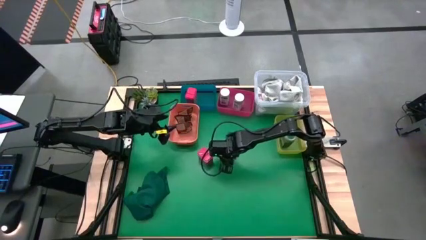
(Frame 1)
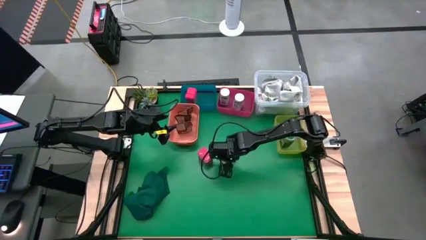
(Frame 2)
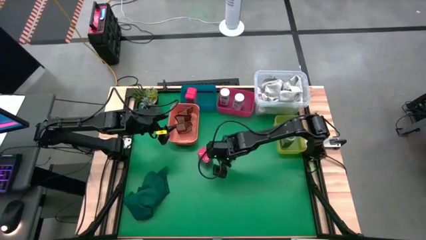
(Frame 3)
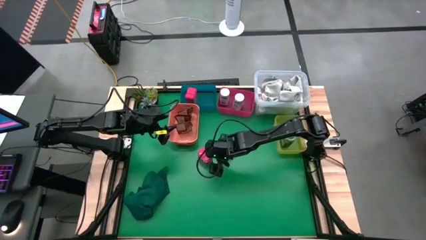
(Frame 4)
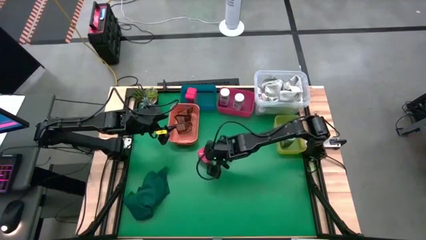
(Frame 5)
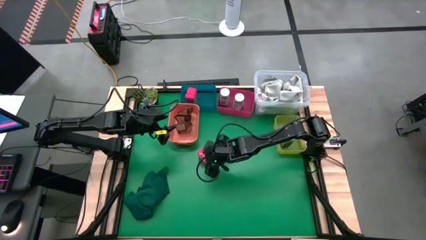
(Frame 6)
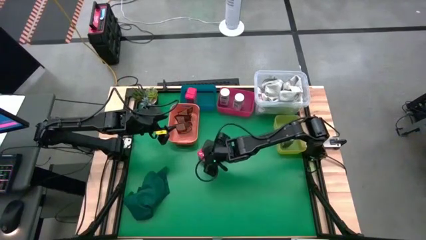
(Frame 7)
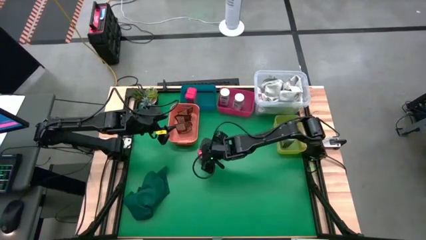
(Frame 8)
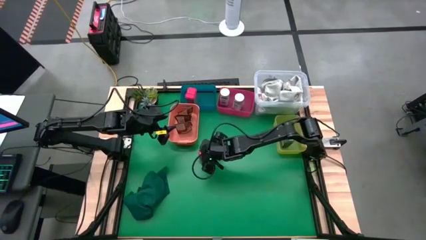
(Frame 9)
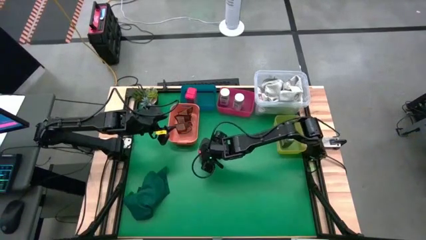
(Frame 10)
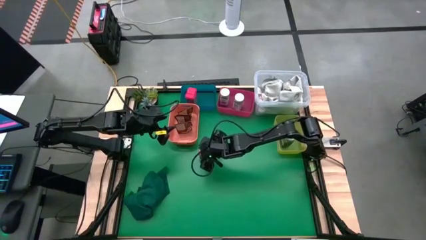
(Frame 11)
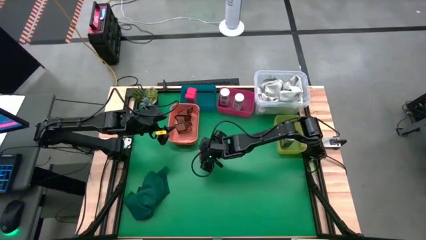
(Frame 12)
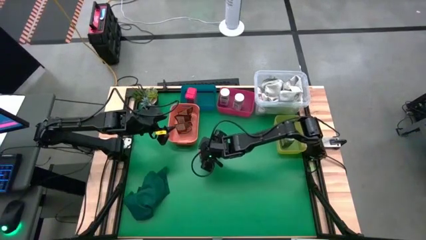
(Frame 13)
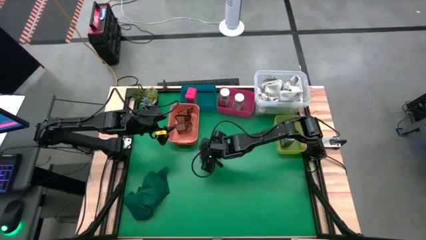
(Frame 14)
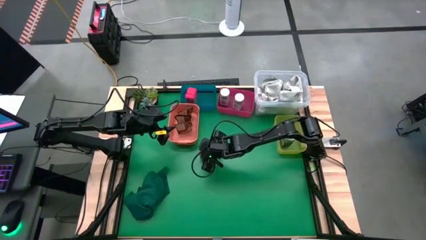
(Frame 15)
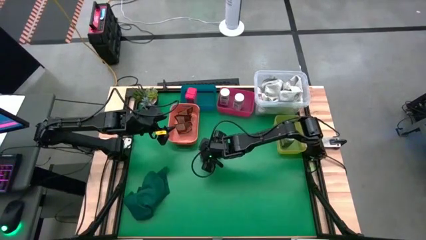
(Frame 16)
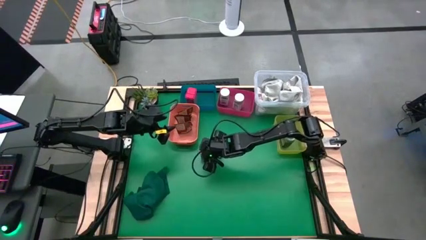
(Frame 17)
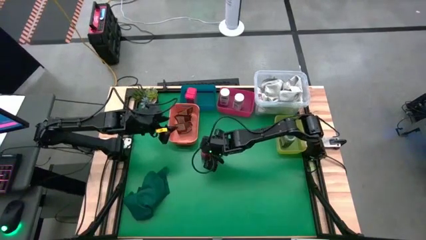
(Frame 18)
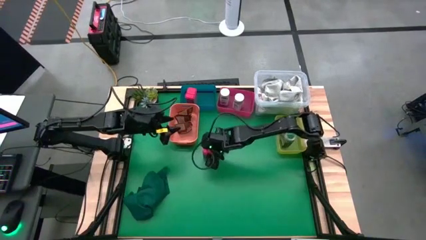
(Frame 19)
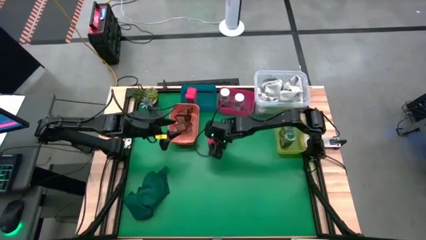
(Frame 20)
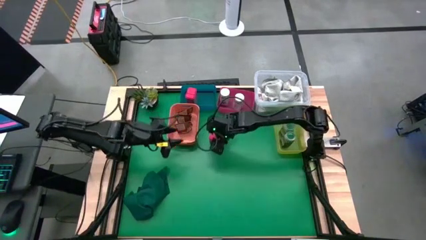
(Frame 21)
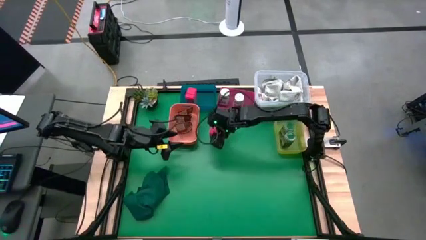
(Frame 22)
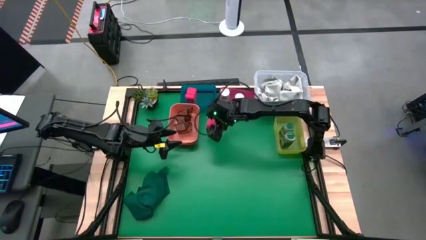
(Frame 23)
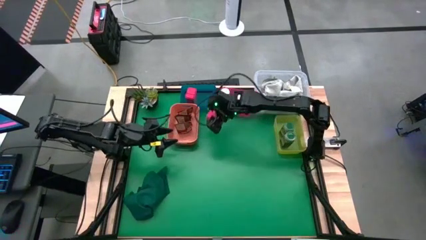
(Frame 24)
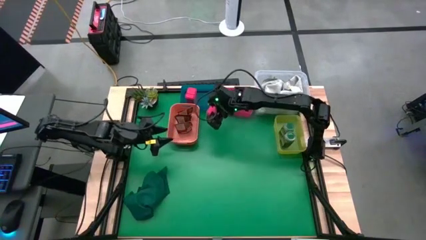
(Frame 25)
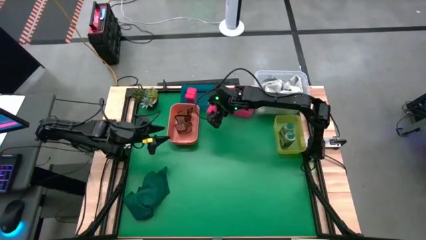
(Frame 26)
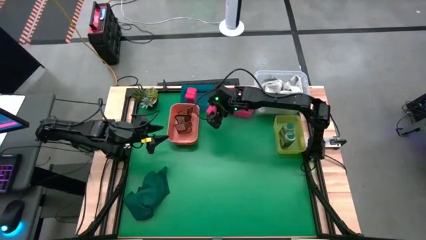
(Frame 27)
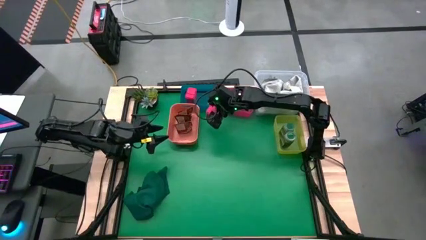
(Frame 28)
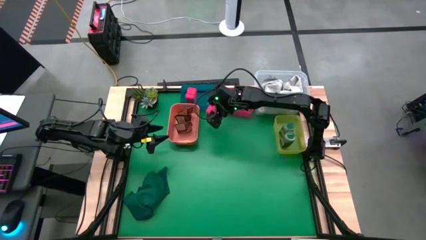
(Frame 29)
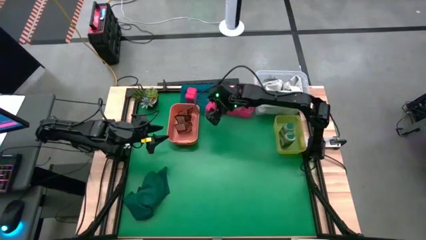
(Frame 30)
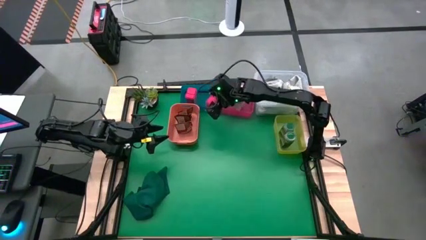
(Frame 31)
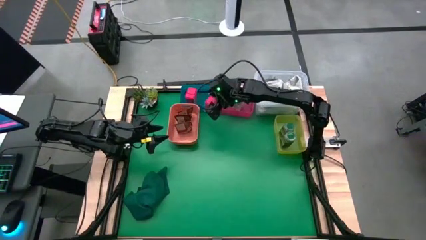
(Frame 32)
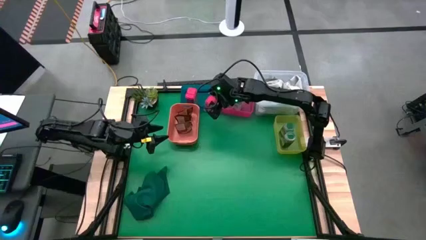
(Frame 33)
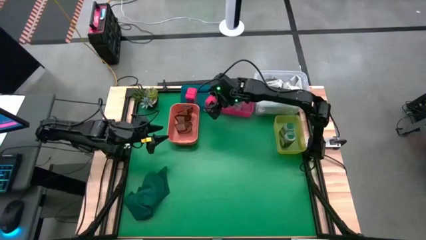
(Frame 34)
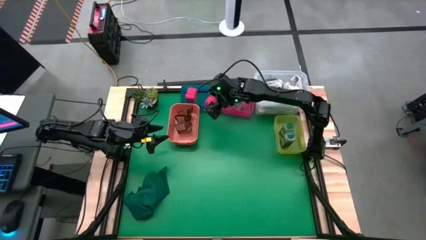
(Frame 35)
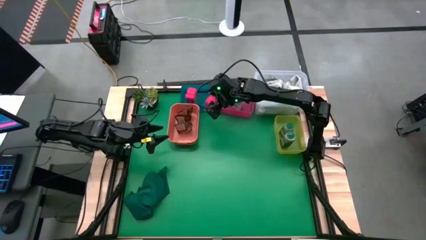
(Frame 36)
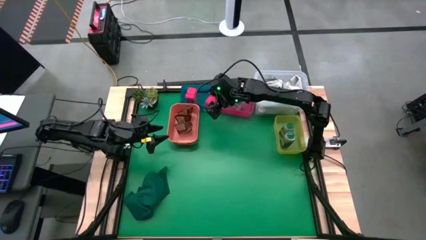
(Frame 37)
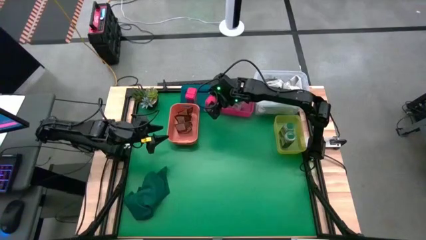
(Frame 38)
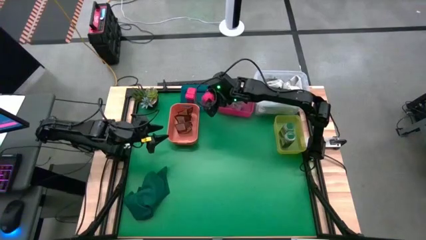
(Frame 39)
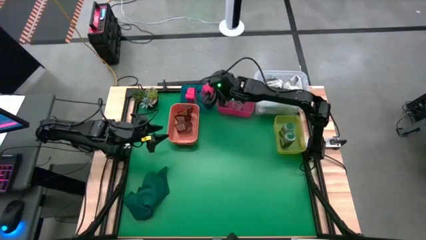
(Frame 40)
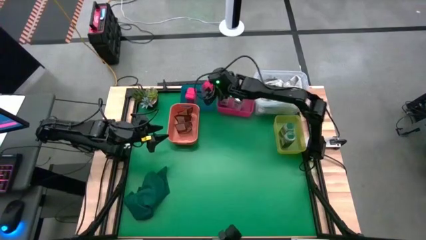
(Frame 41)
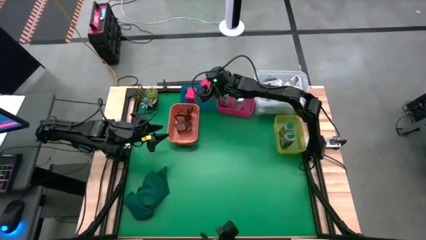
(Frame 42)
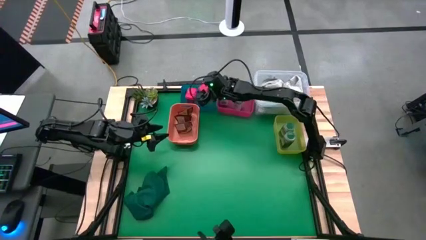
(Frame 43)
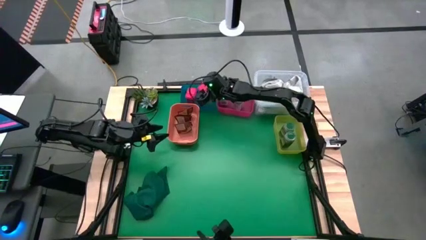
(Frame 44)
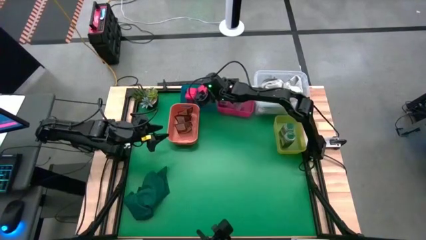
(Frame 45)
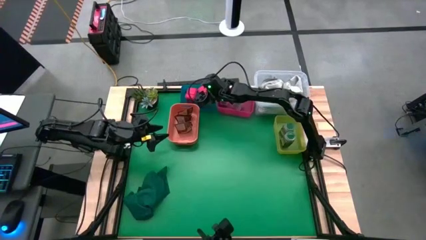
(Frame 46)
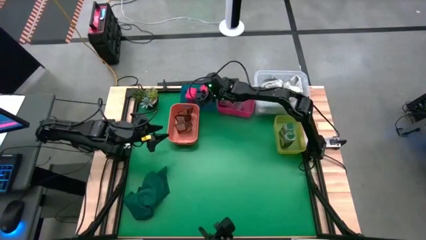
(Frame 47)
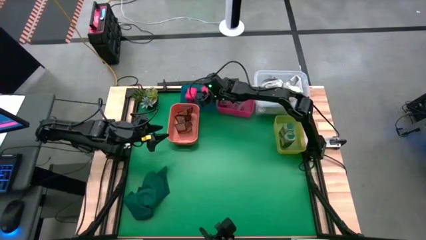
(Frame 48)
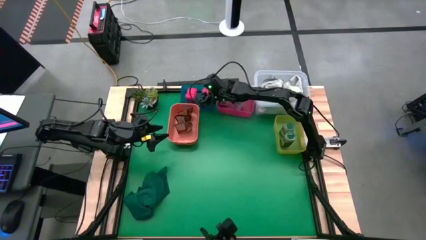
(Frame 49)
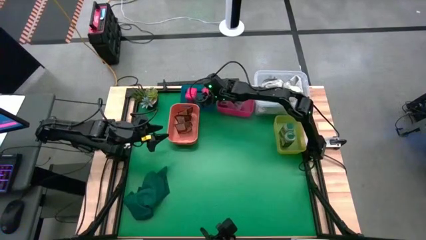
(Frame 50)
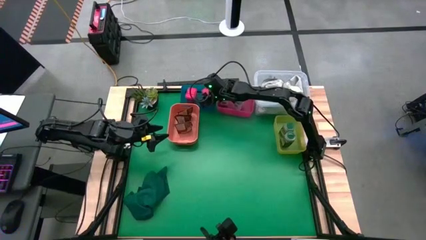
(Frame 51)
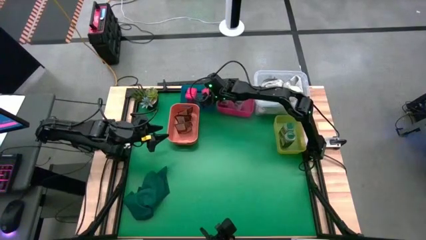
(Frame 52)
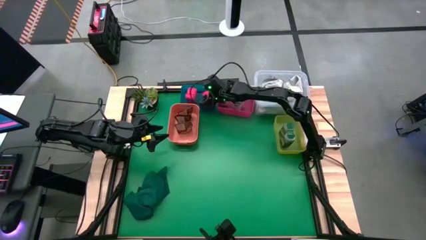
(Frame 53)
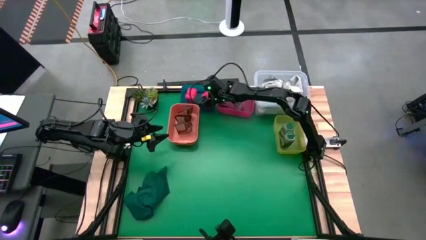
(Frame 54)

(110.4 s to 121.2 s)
Task: Sort spices by type
Put the red spice can into the blue bin

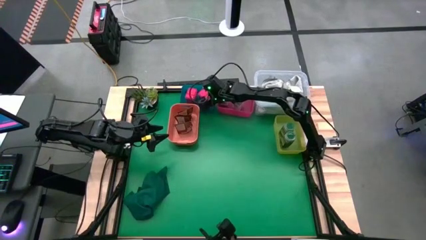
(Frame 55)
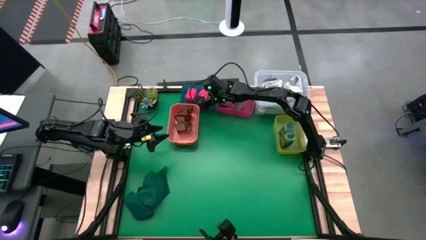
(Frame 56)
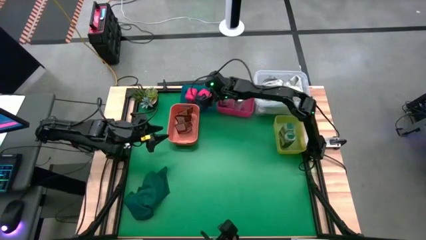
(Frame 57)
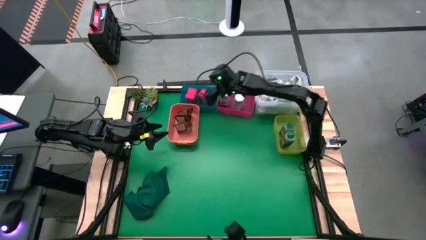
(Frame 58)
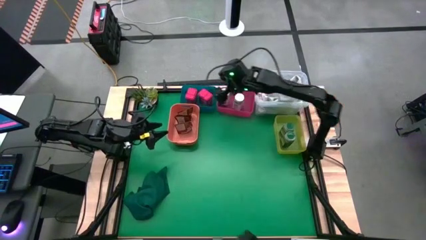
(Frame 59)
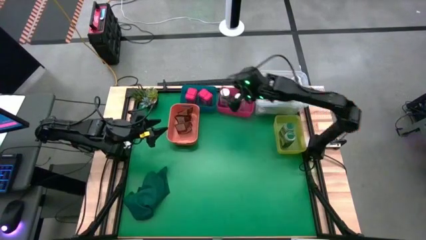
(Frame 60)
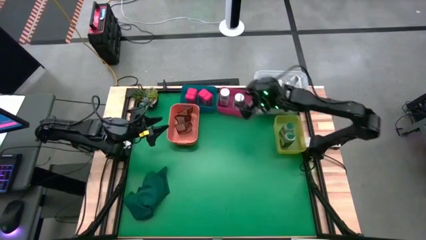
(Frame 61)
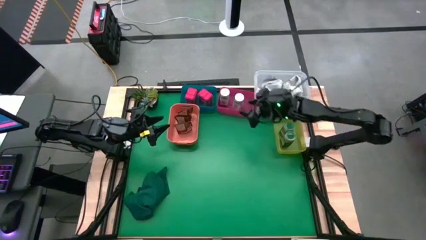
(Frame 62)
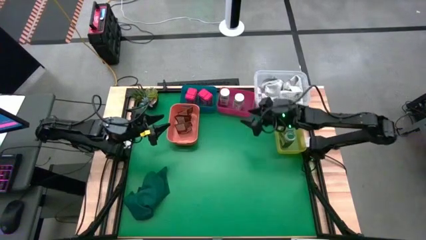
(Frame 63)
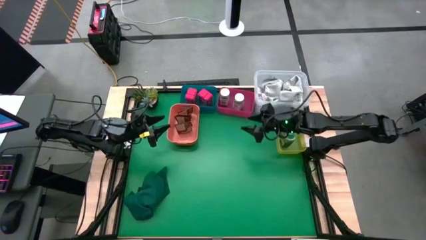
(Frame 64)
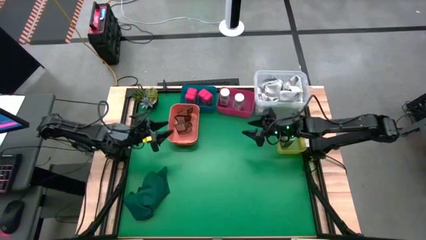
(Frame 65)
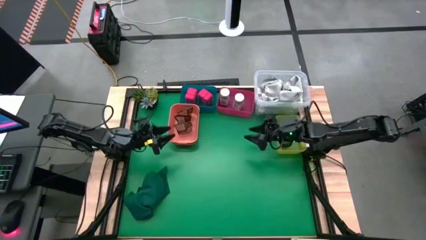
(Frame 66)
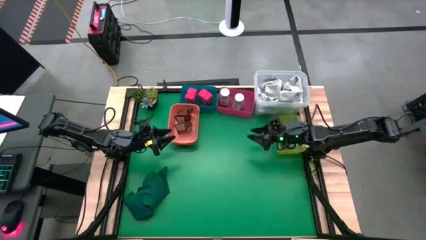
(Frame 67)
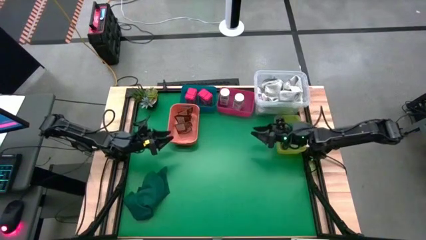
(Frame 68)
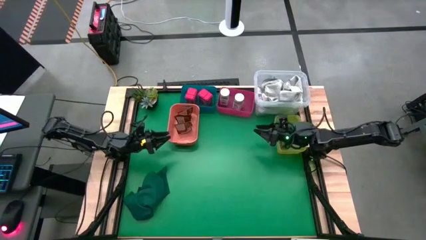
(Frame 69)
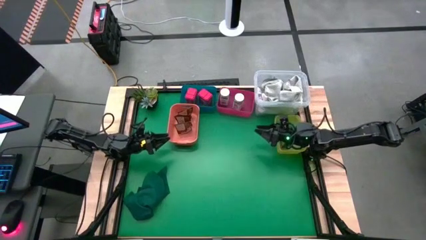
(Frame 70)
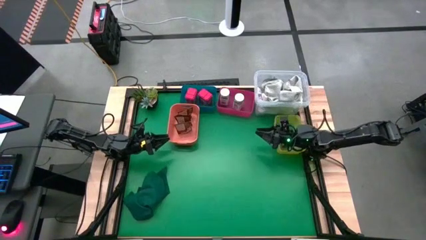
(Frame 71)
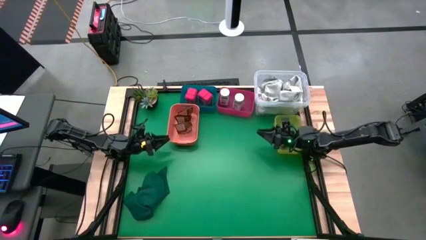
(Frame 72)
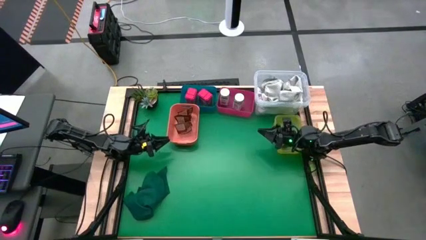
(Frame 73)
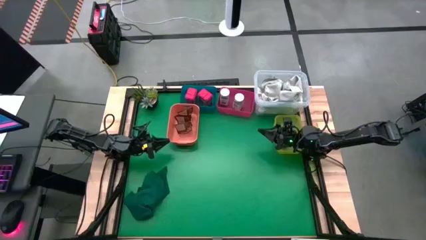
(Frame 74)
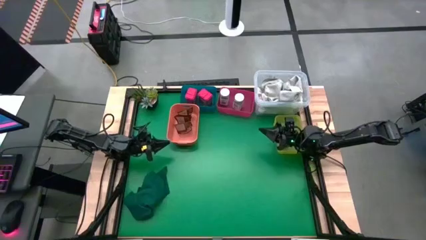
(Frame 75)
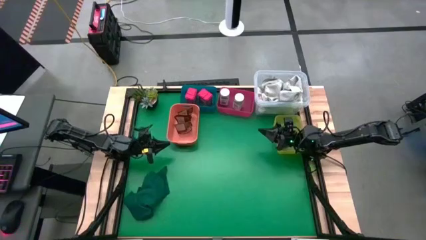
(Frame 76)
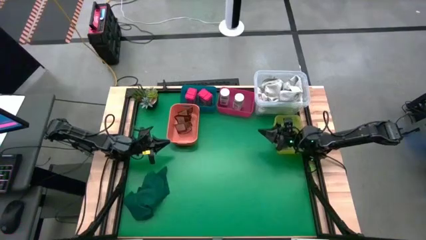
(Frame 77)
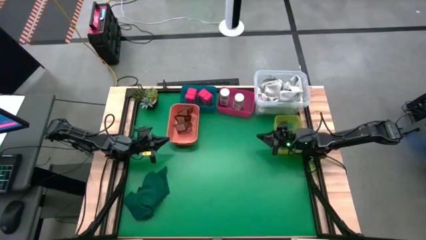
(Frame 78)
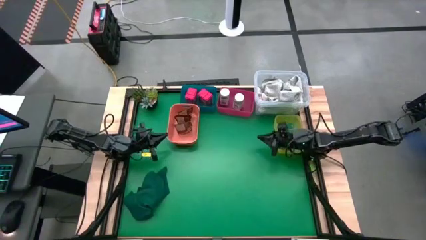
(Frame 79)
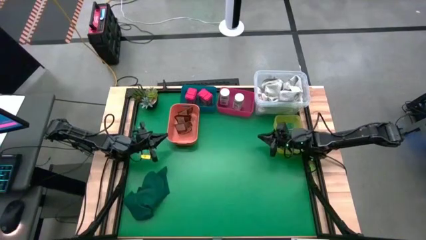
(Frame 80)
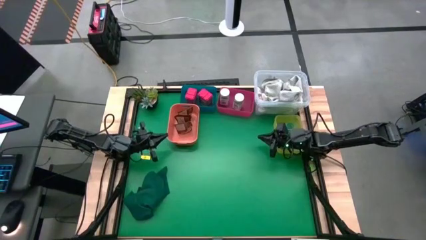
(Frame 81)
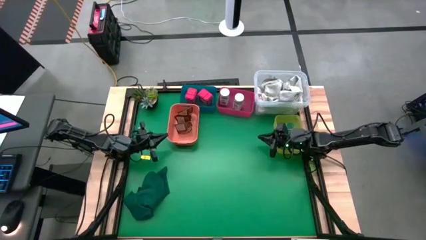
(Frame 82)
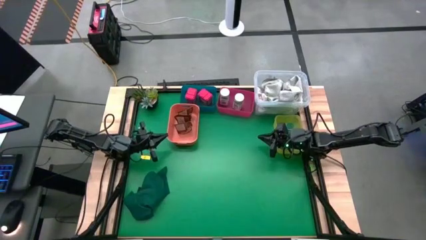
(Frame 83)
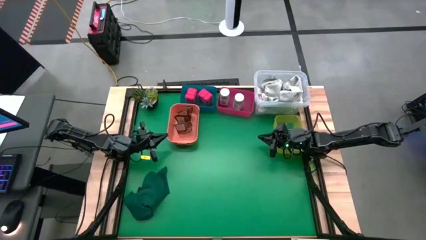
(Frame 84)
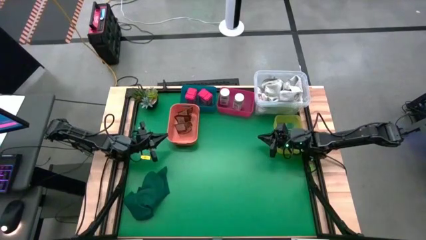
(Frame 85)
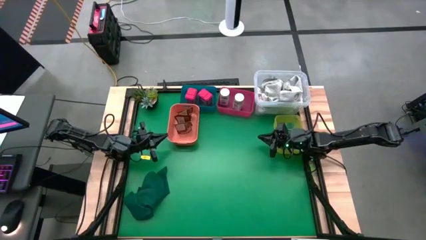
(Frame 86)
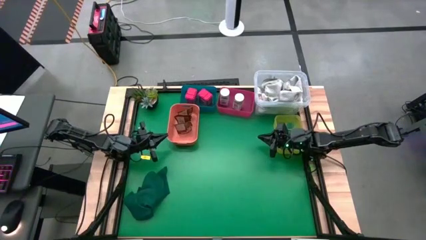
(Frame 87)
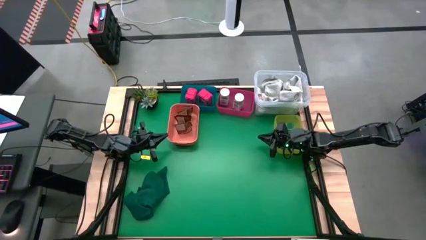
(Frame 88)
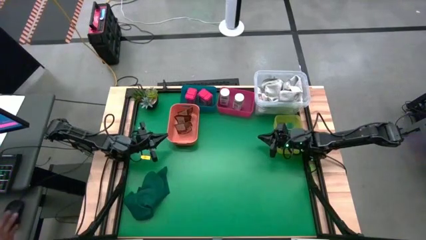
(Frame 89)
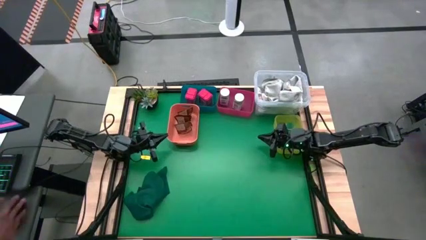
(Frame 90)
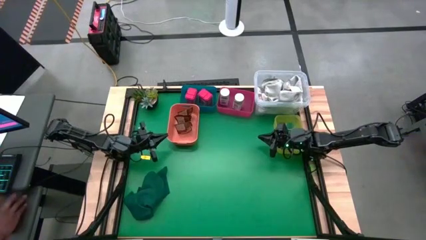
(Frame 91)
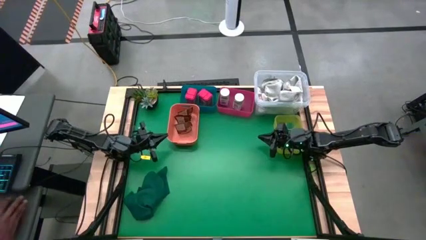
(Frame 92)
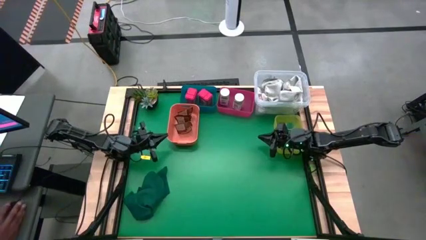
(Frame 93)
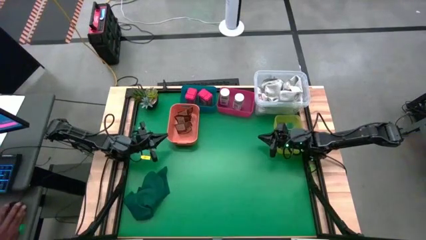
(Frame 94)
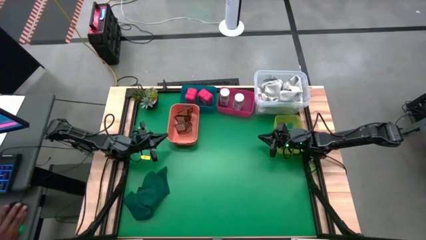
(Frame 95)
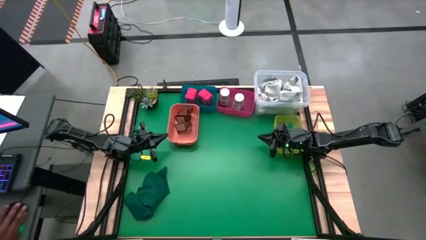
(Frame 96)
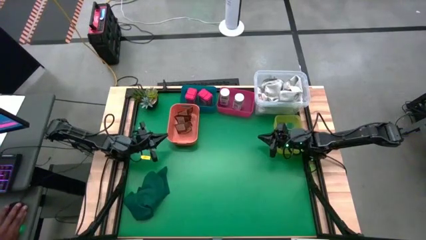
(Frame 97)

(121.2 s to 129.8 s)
Return to Home Position
